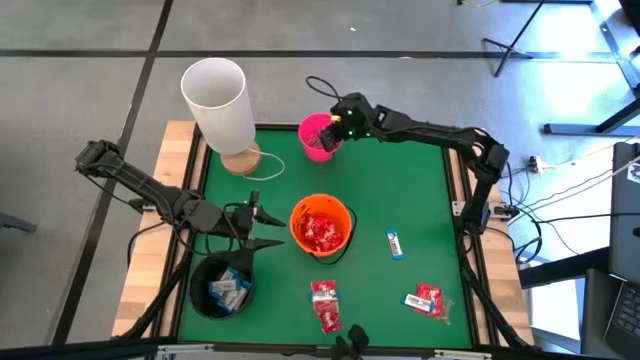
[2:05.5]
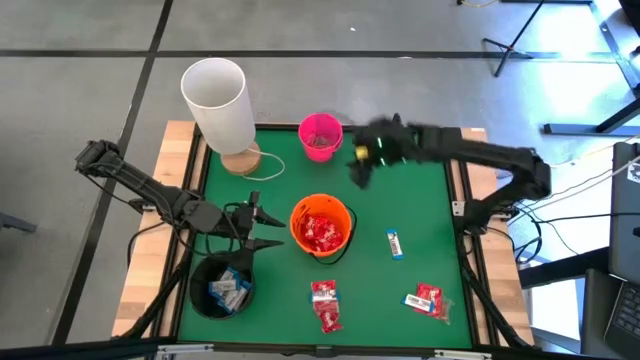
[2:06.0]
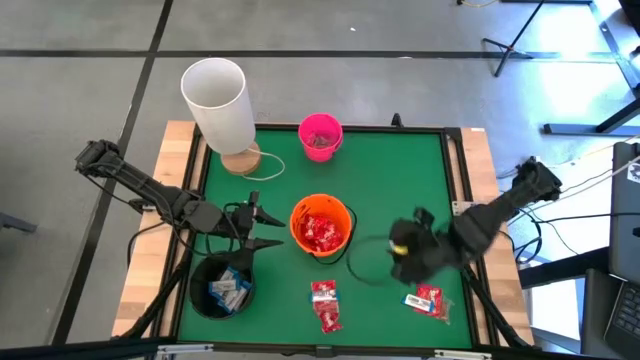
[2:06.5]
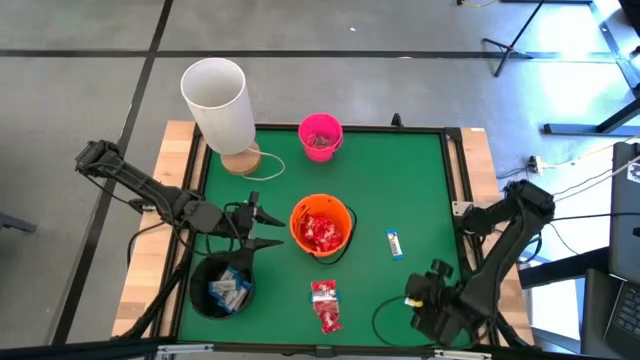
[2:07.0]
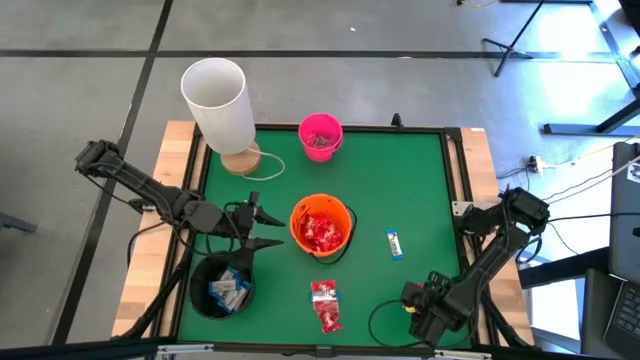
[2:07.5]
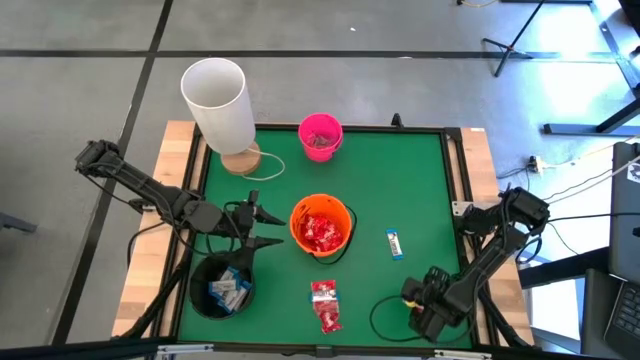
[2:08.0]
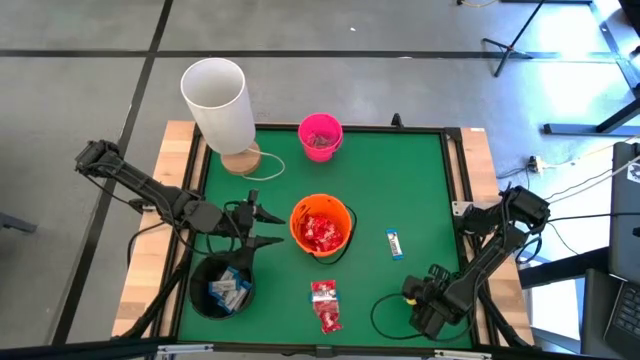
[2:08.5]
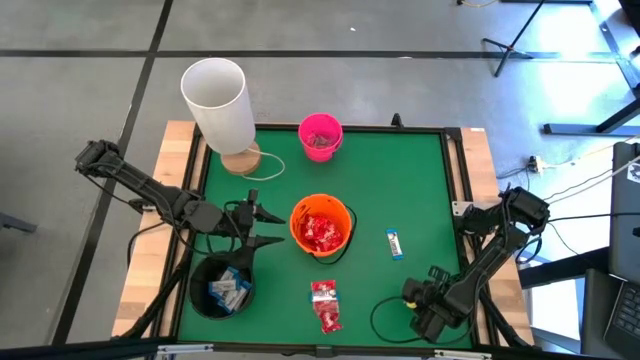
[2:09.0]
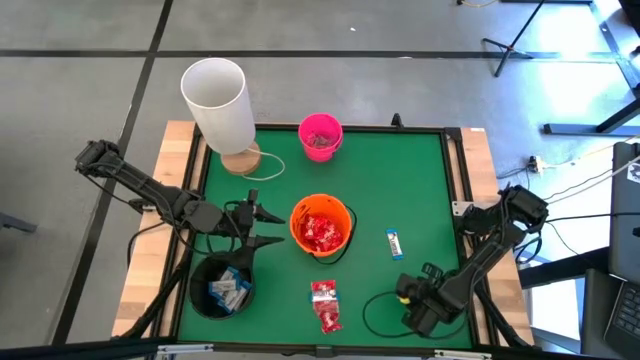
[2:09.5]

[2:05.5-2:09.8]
Task: Sort candy
Put the white chocolate into the black bucket

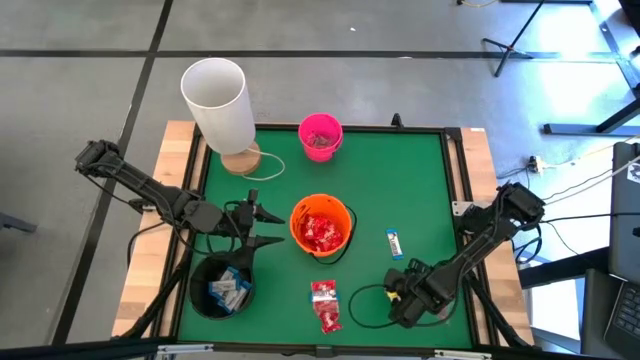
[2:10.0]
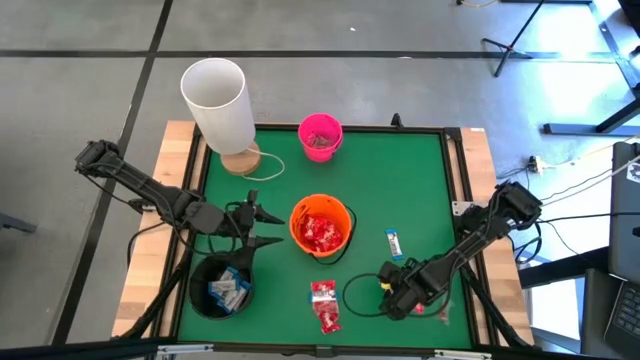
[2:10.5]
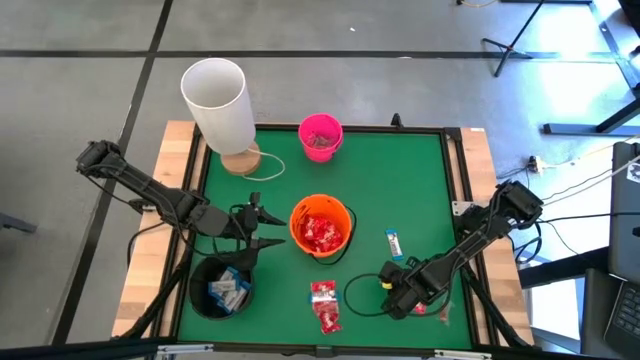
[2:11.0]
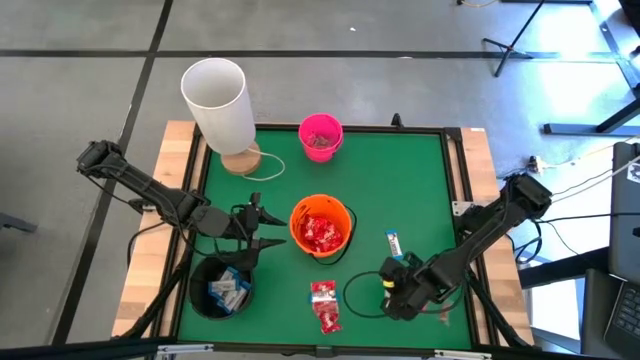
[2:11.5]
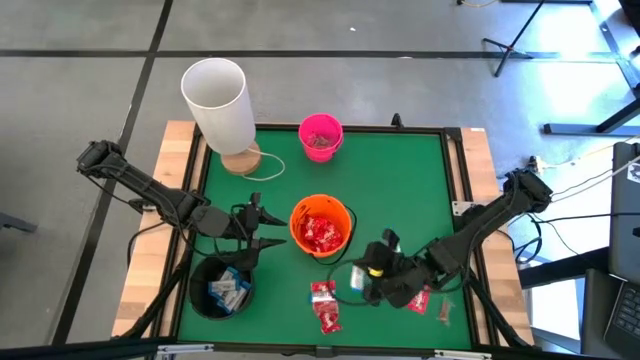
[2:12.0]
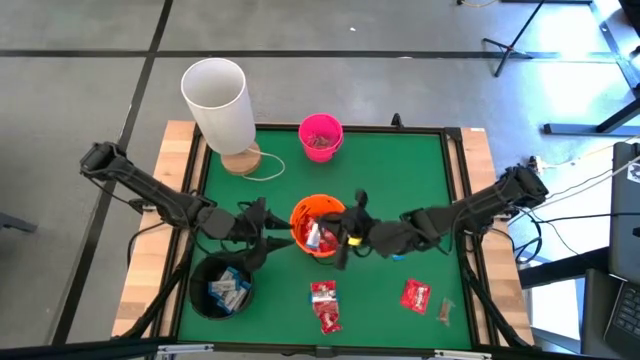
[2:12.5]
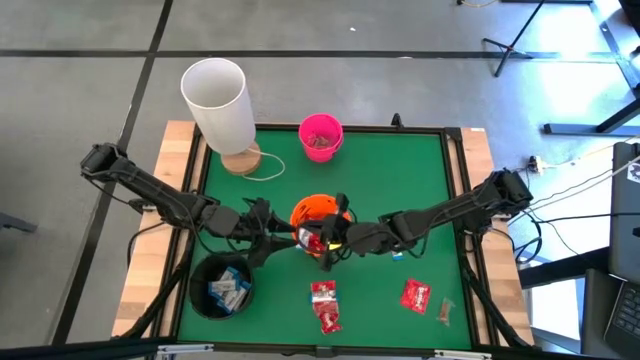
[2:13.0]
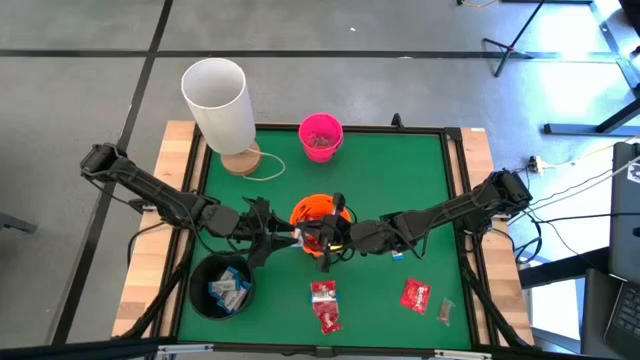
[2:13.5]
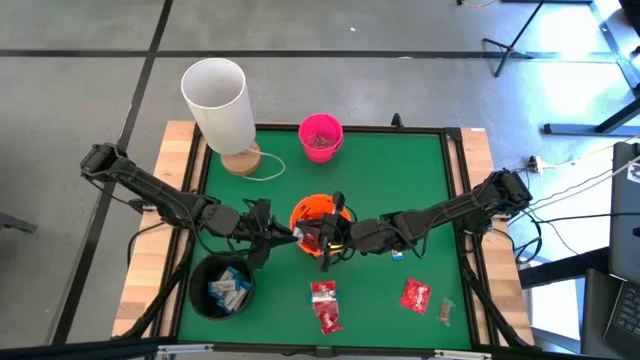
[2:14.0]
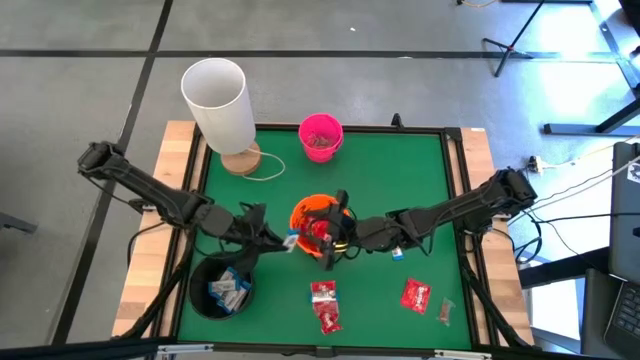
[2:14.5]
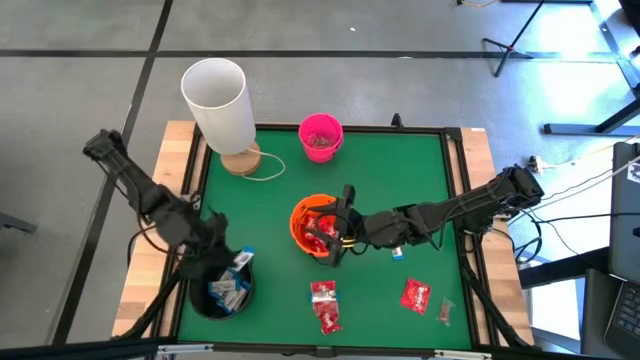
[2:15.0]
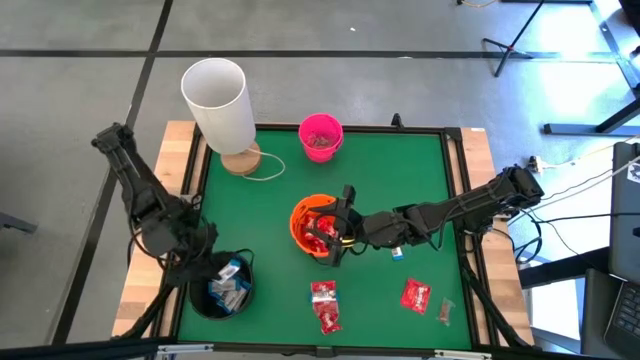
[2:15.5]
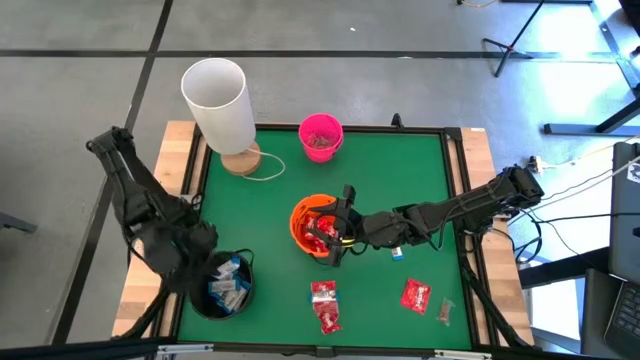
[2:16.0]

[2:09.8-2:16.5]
Put the white chocolate into the black bucket

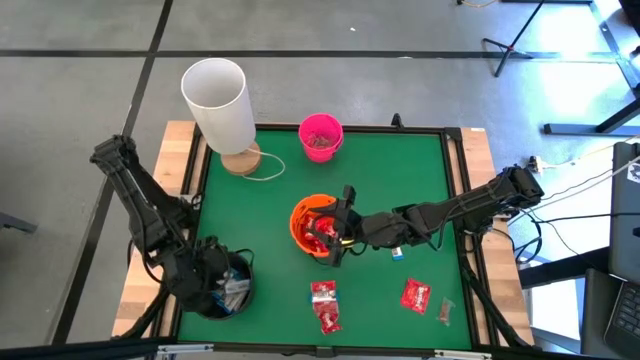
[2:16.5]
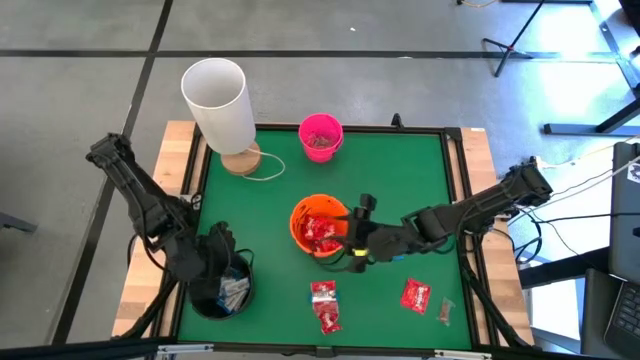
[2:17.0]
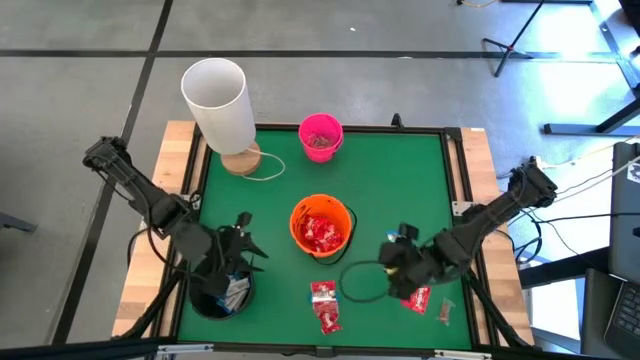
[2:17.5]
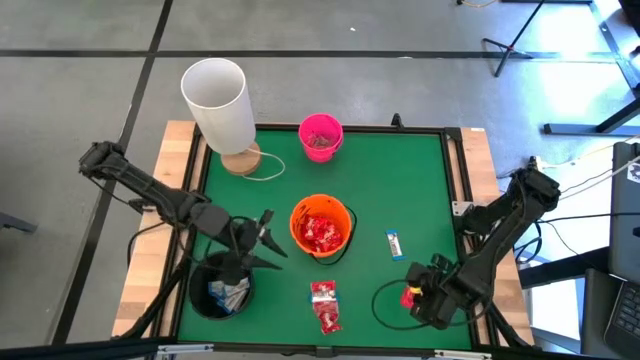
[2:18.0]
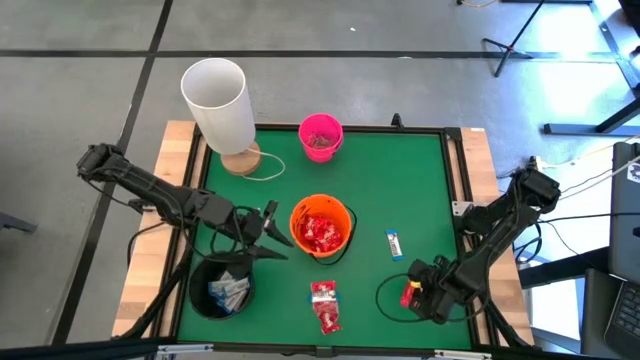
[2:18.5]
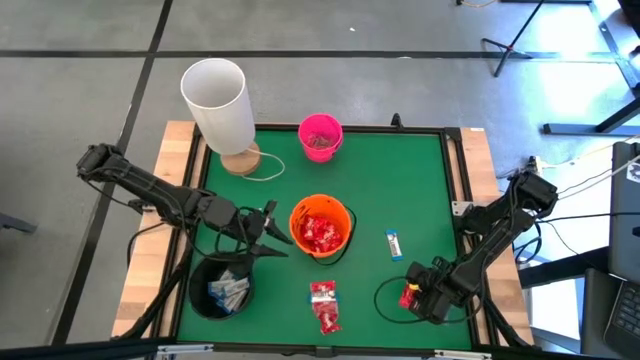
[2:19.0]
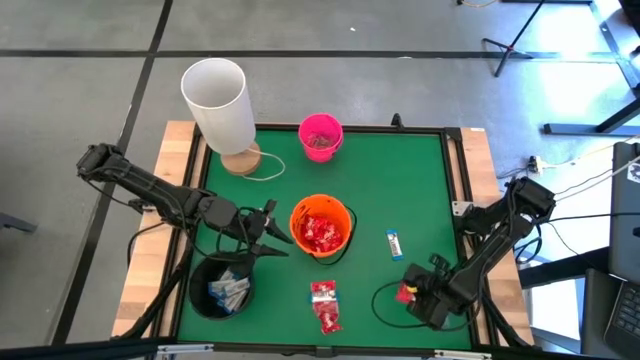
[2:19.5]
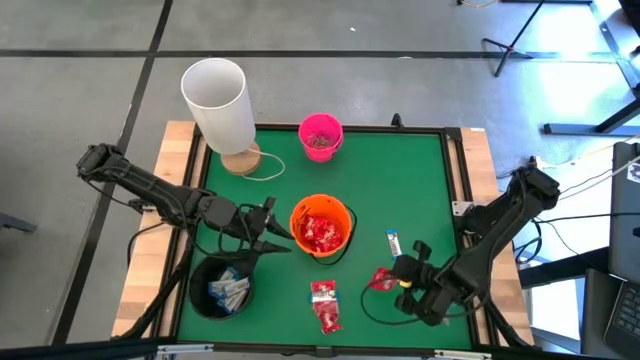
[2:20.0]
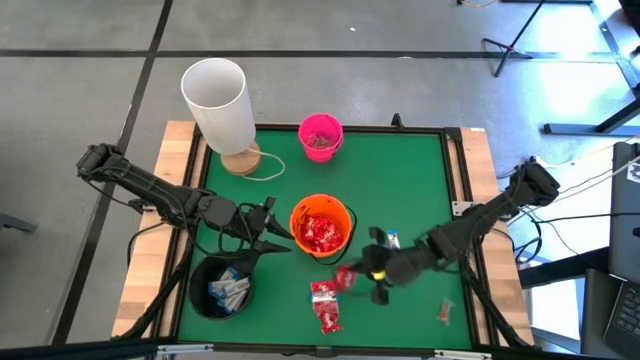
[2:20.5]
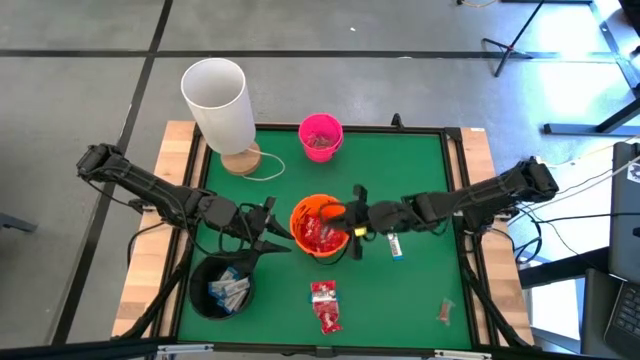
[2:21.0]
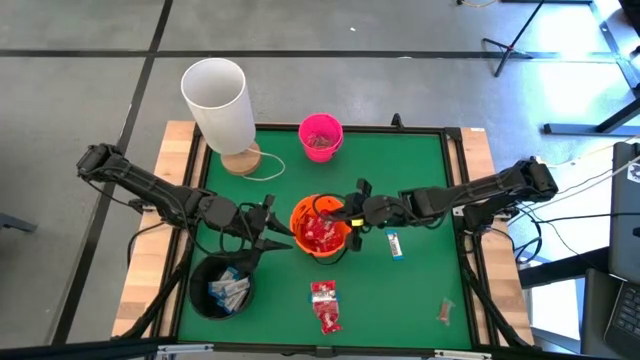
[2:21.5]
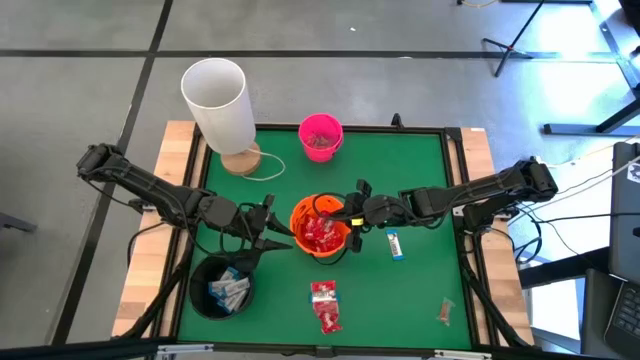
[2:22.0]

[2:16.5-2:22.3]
Put the red candy into the orange bucket
